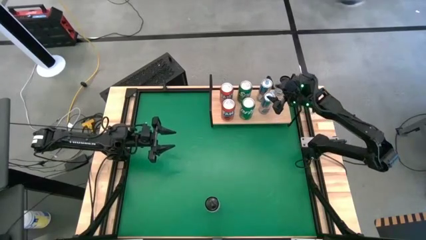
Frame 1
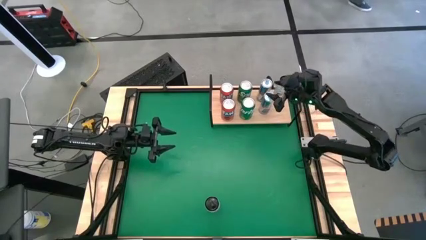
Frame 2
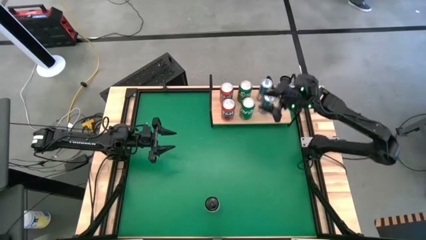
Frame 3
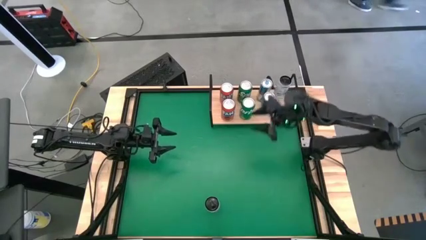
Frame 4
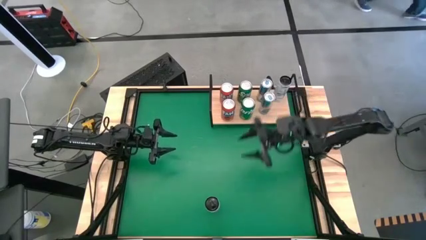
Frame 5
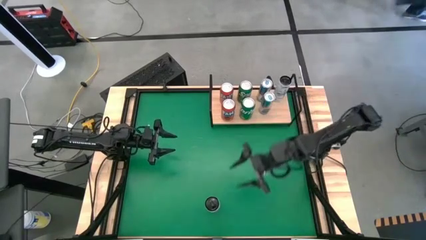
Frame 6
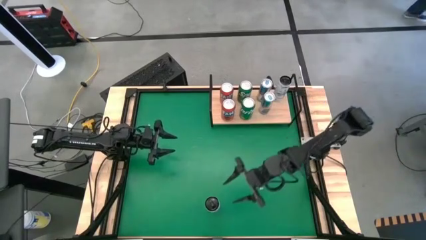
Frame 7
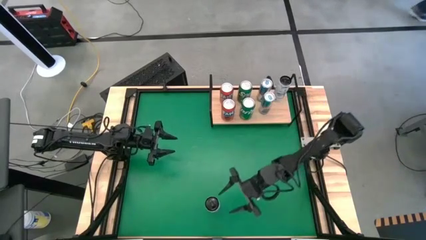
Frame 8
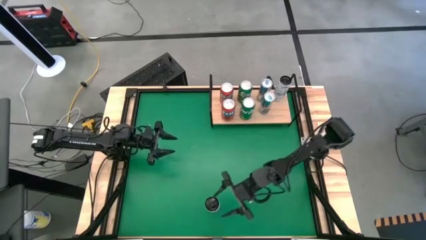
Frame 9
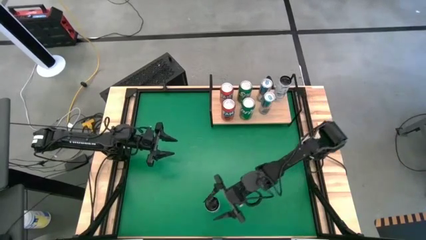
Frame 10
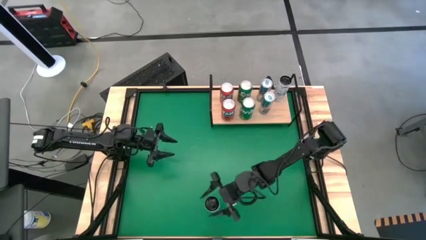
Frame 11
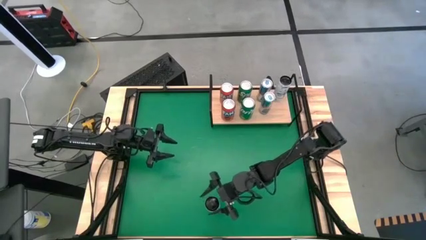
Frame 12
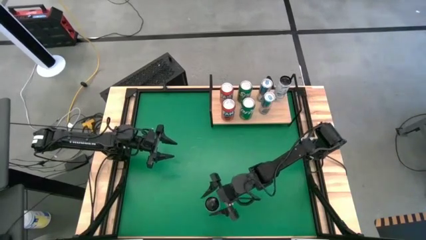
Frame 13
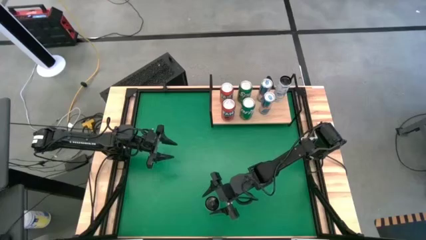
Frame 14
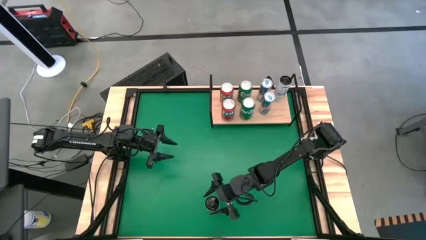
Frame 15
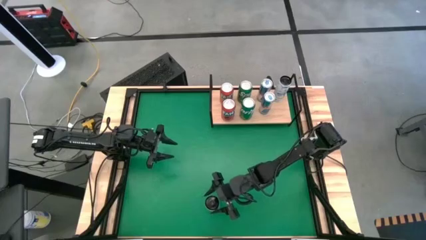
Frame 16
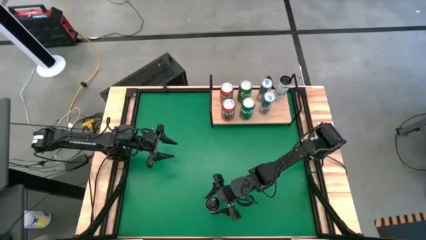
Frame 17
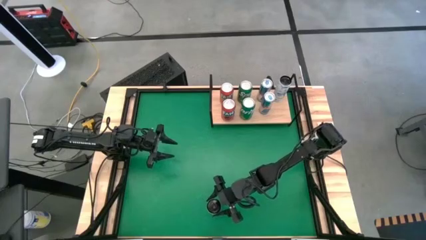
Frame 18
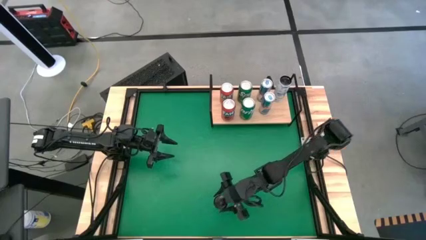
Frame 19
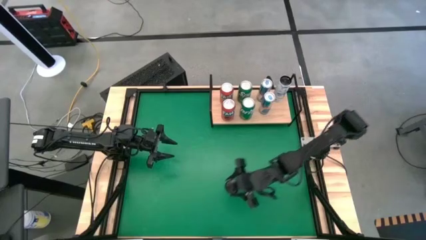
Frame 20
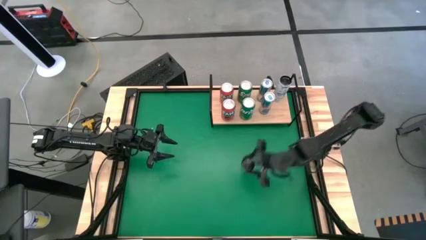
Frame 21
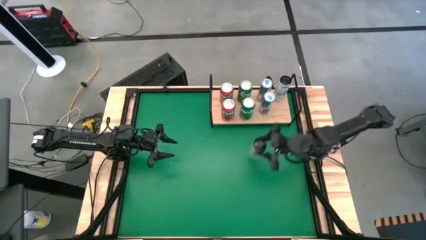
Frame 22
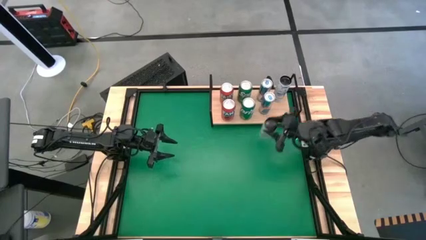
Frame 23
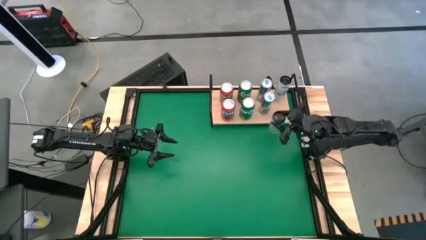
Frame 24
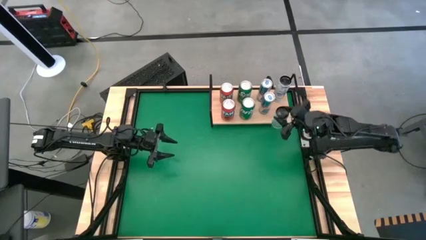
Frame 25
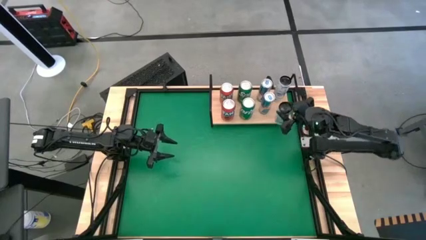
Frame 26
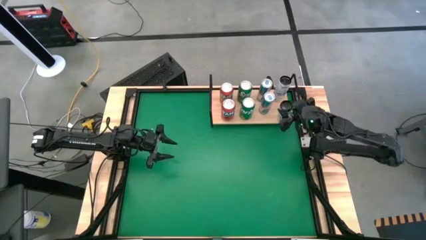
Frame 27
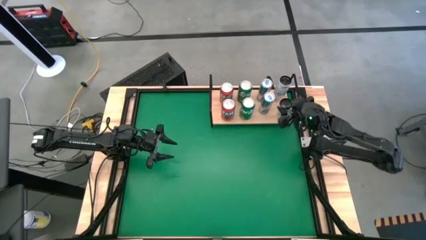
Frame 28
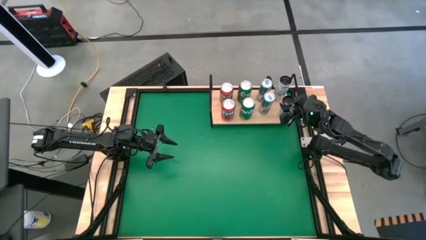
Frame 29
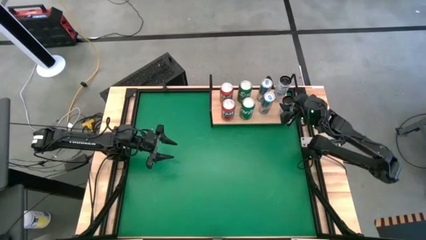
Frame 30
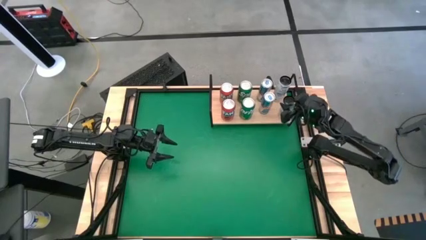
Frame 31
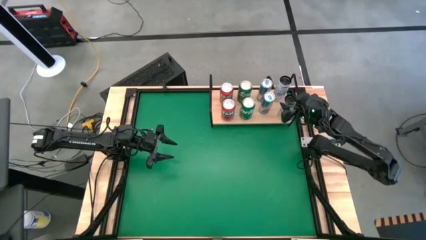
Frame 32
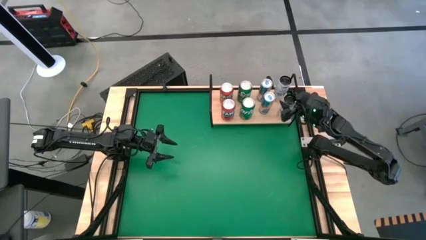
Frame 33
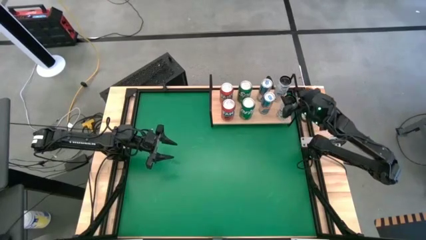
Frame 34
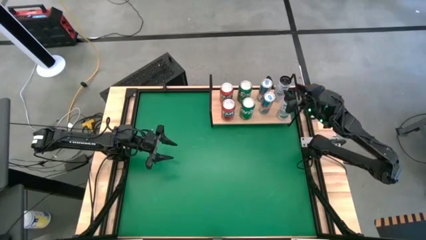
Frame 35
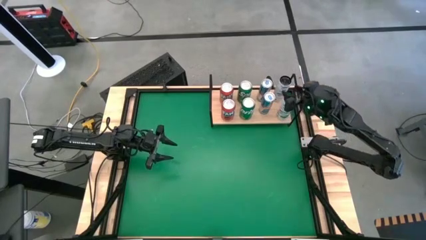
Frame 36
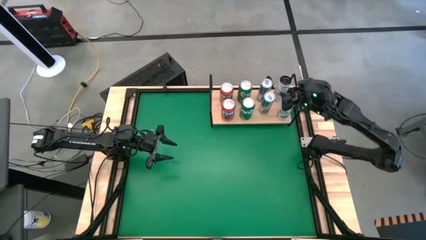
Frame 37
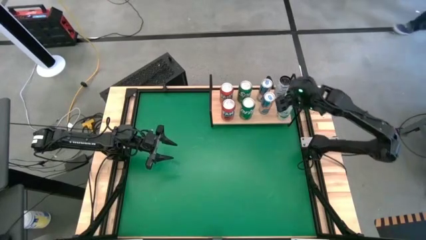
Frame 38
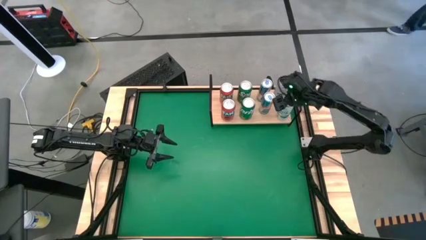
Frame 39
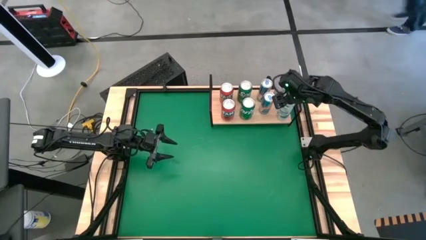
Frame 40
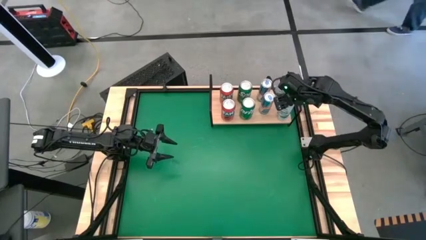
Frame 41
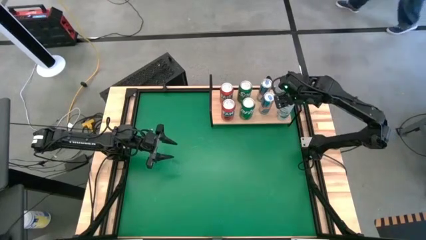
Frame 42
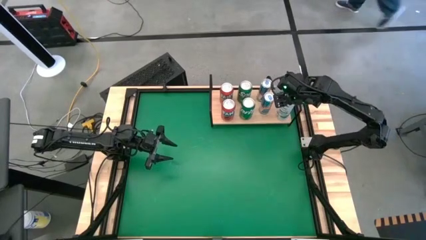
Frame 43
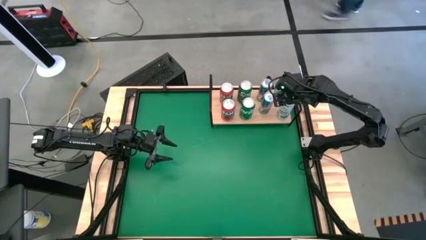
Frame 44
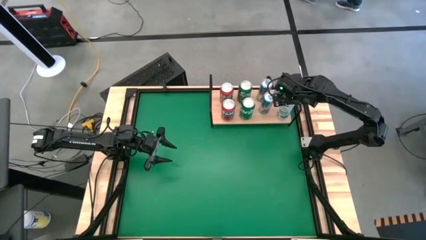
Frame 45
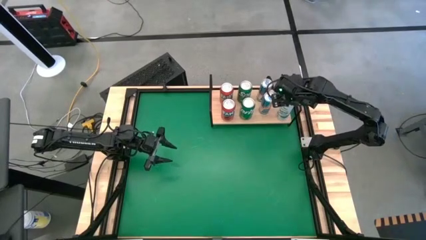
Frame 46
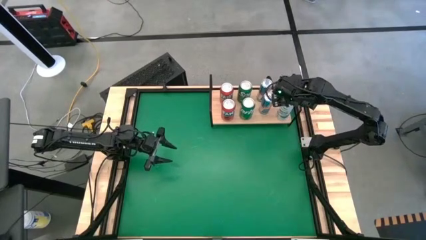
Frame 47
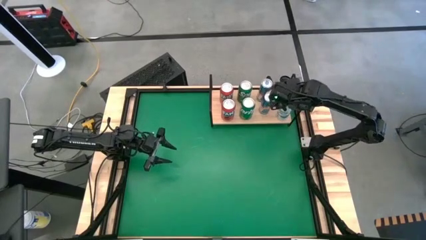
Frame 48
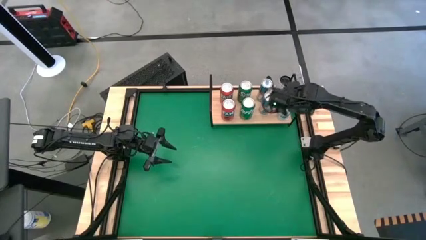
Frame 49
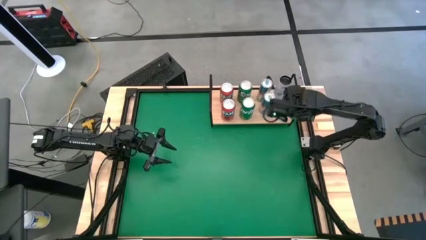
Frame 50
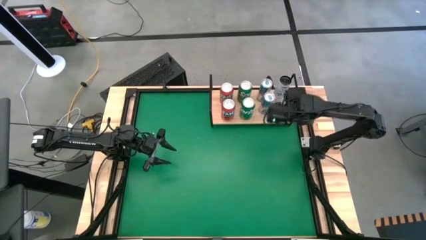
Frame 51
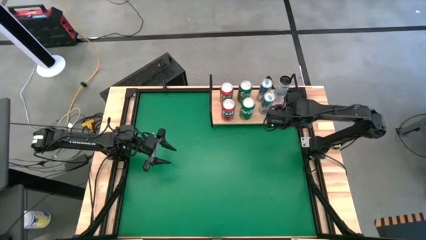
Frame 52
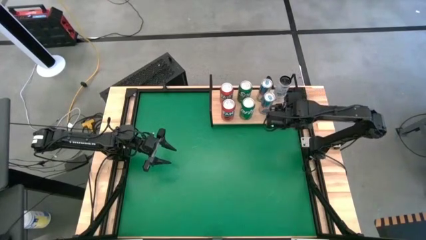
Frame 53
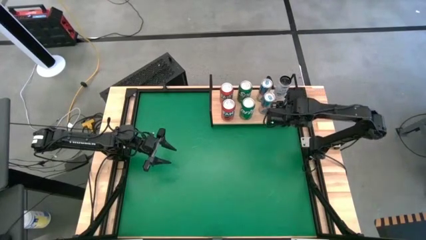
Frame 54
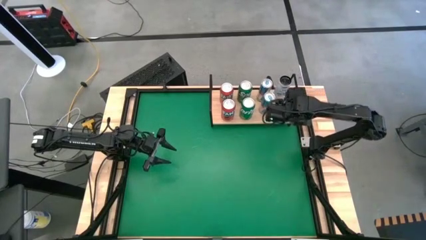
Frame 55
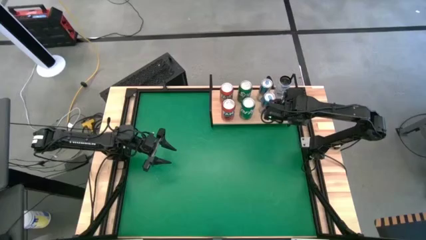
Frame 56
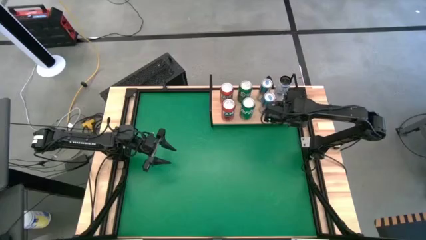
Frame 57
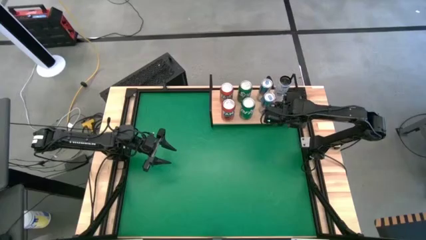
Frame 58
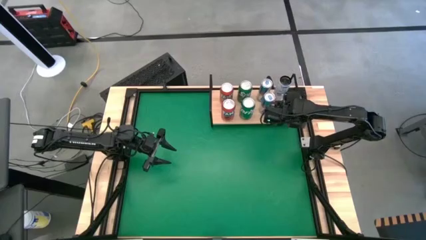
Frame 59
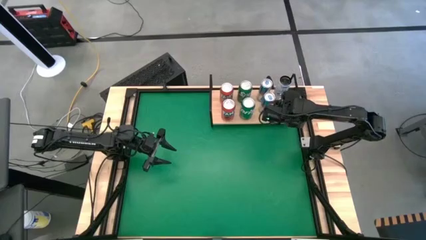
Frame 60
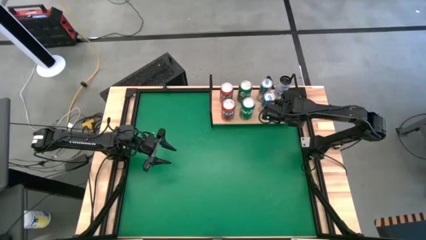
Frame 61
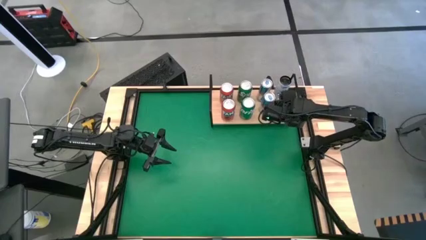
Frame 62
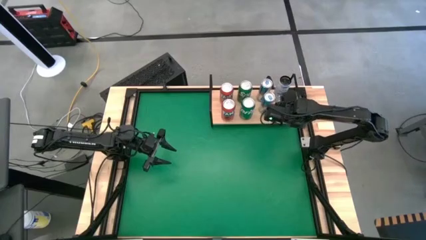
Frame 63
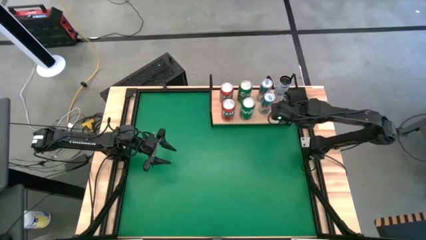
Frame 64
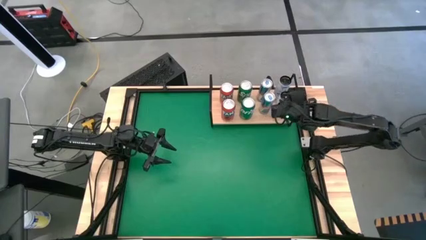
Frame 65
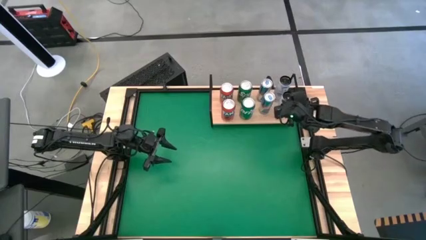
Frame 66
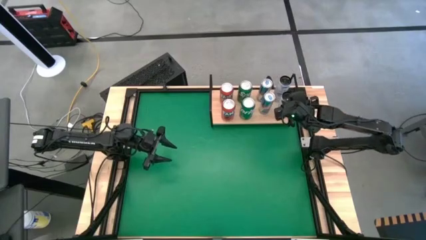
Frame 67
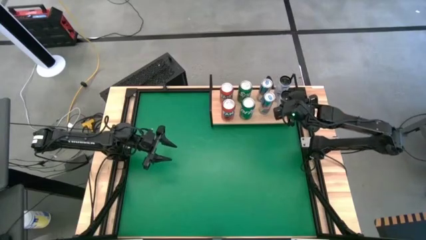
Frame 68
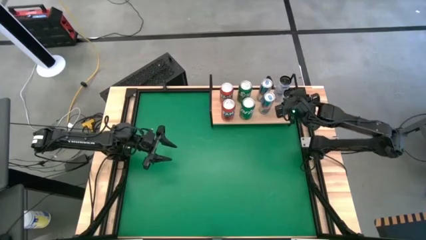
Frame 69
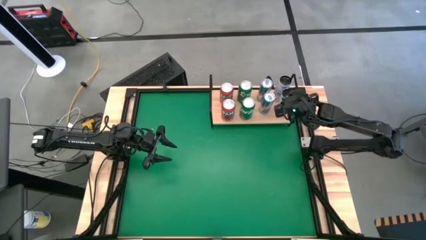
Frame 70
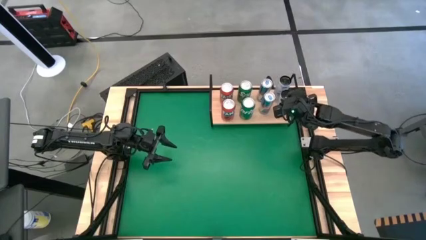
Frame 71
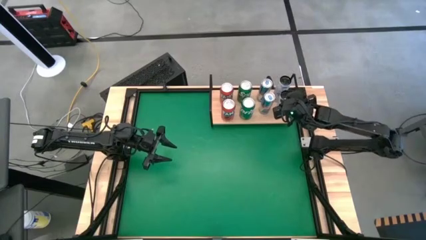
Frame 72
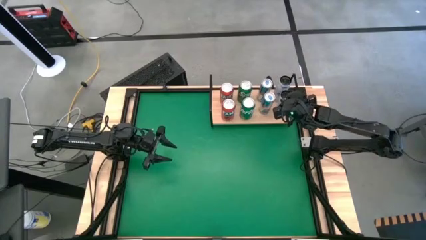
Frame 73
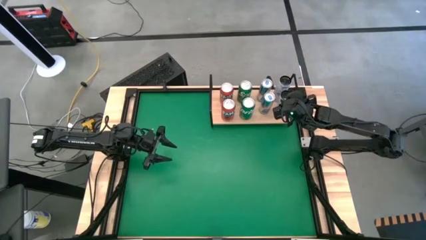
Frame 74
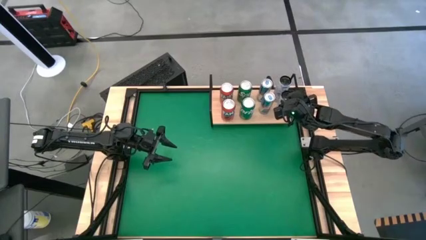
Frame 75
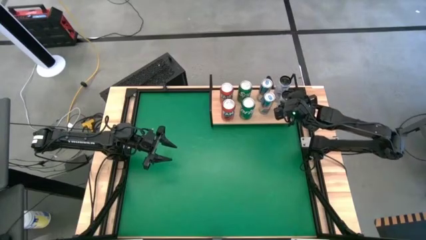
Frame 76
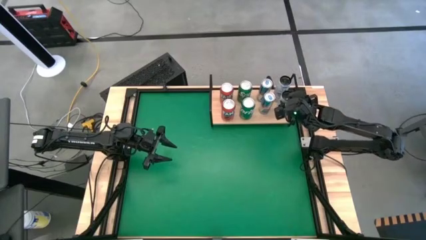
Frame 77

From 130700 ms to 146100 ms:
Task: Place canned beverage on shelf
Put the white-blue soda can on the shelf aligned with the other white-blue soda can
